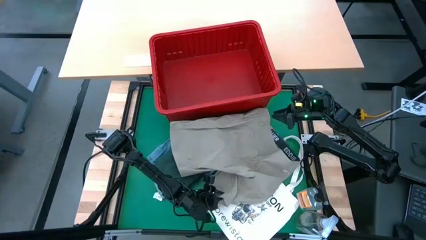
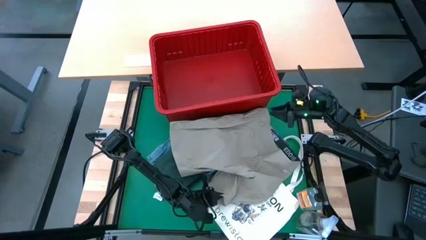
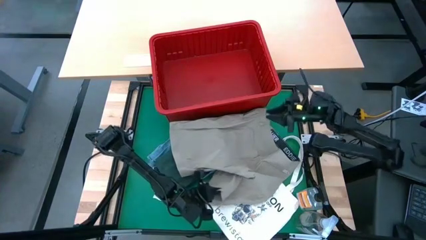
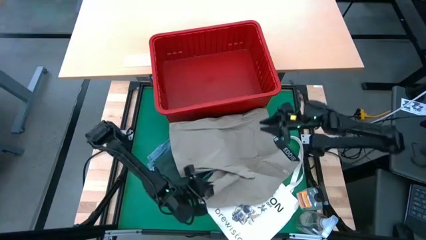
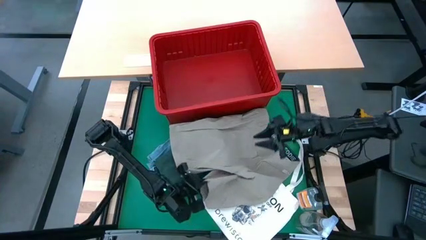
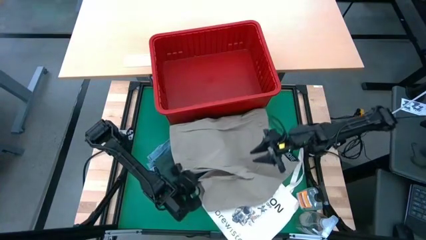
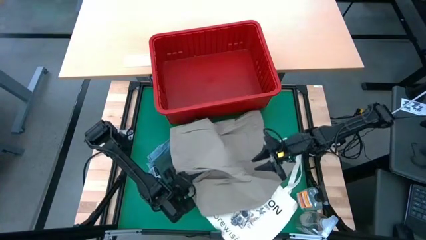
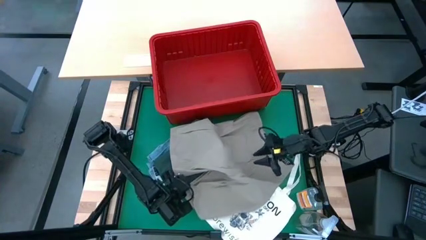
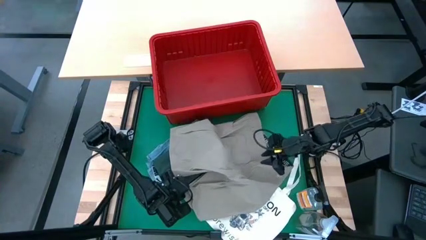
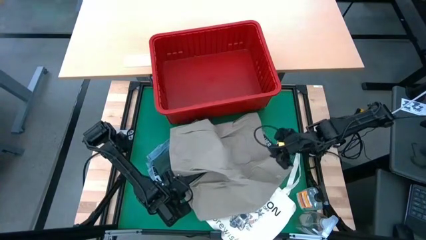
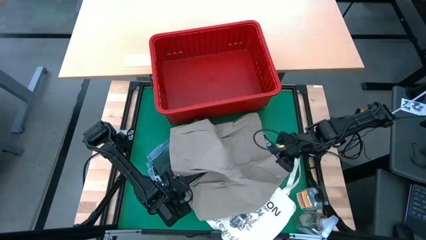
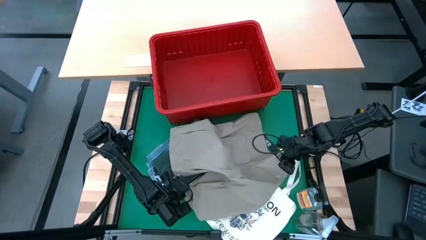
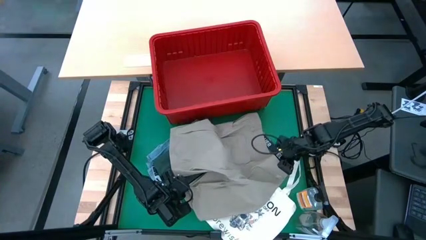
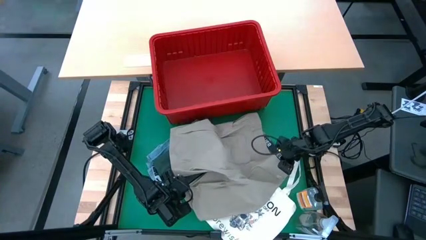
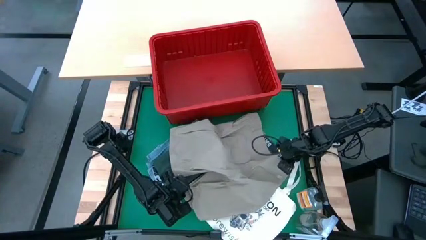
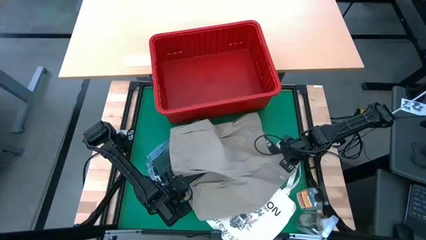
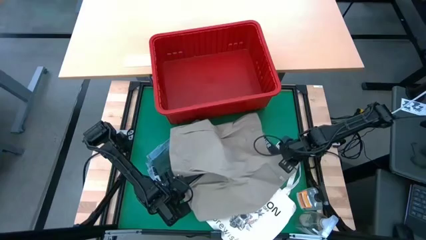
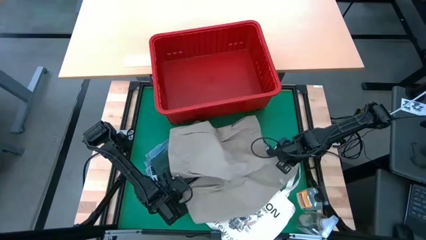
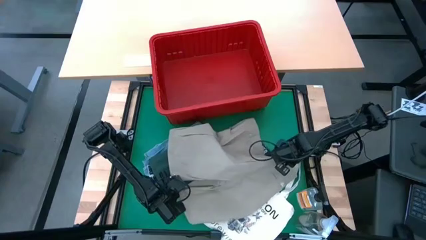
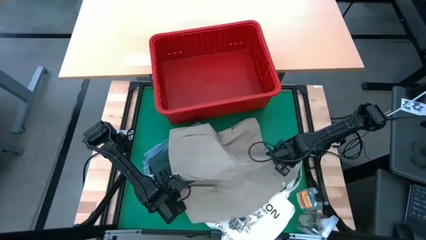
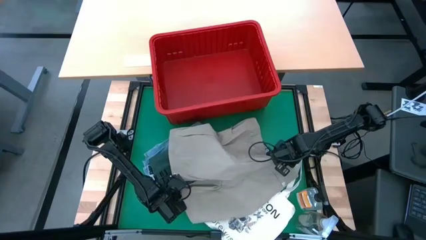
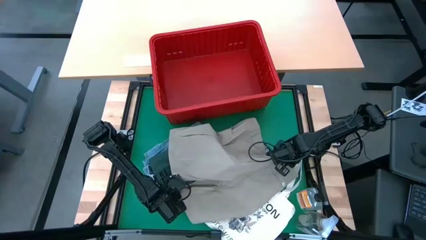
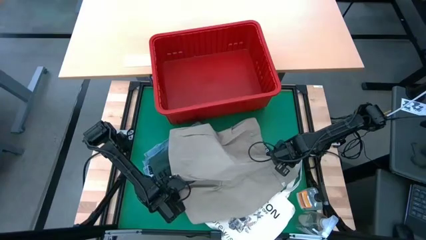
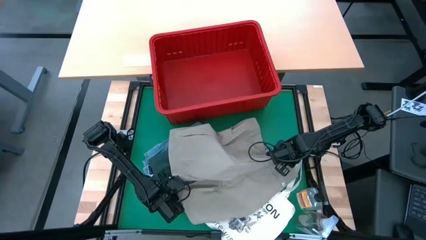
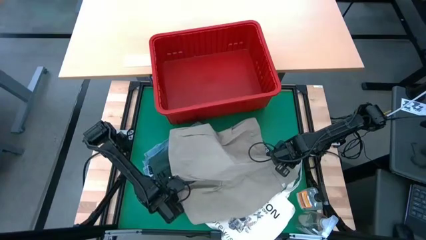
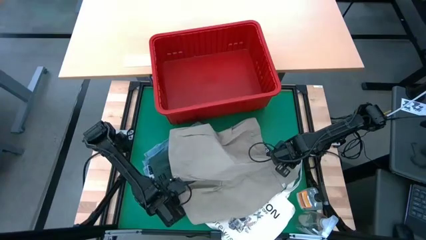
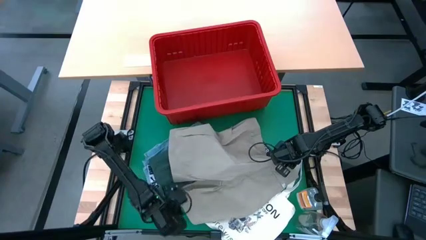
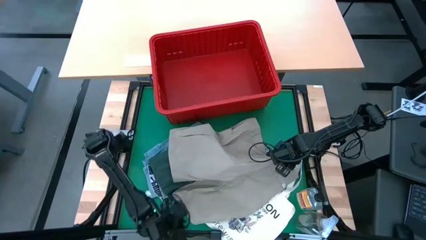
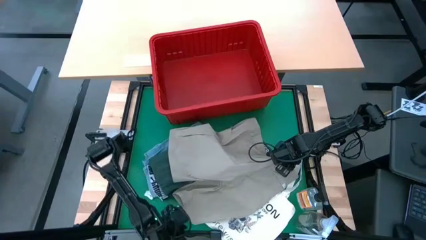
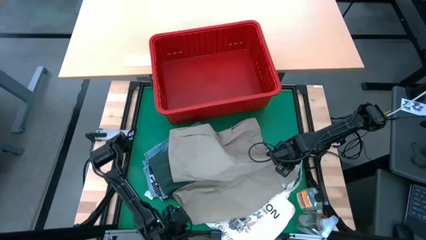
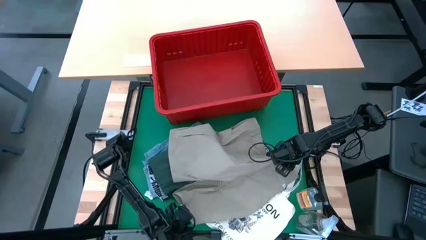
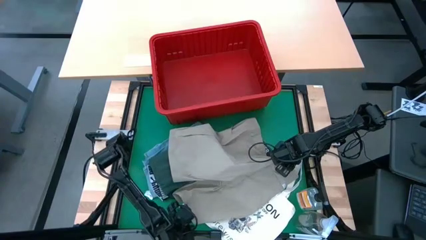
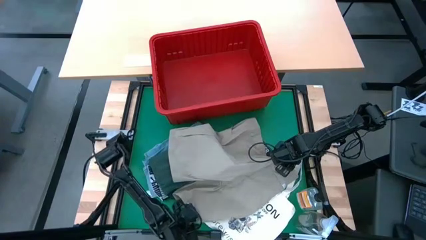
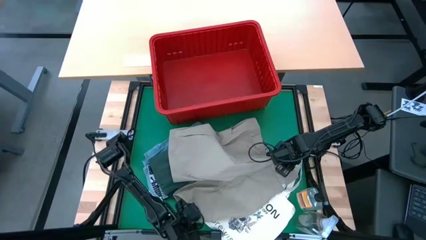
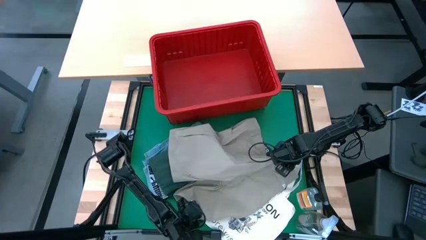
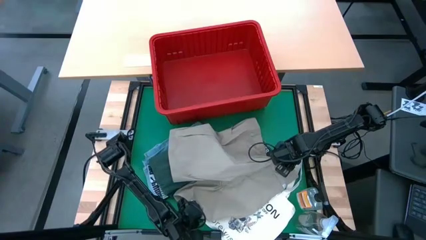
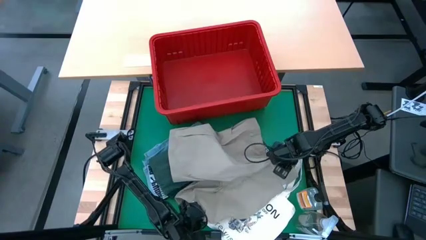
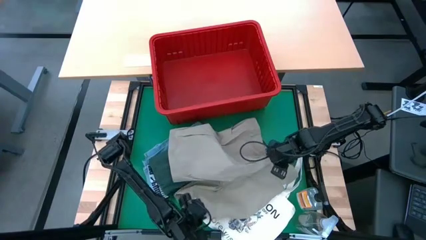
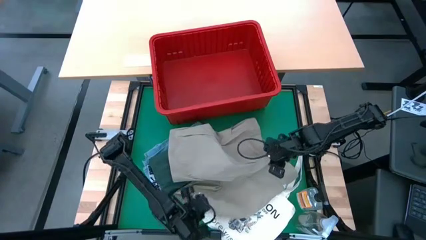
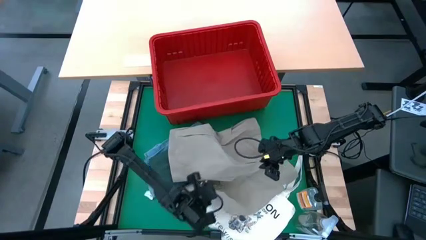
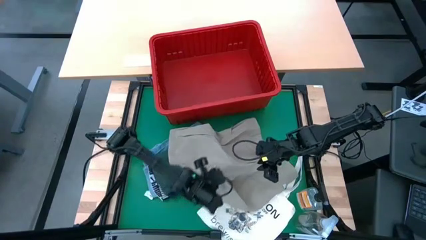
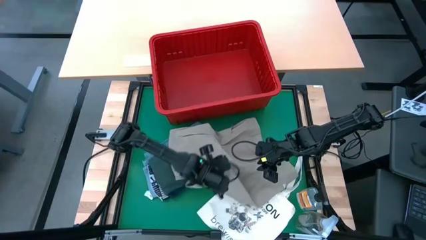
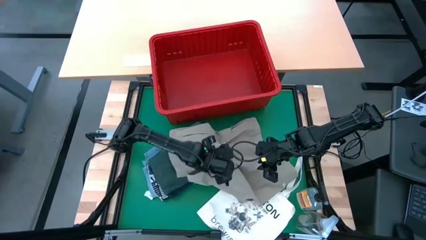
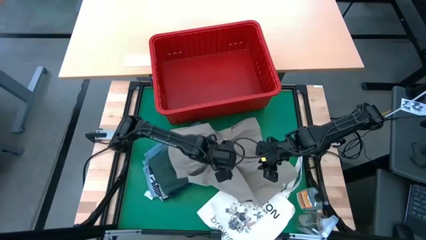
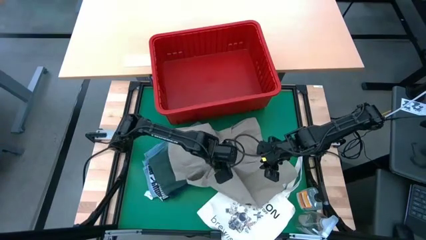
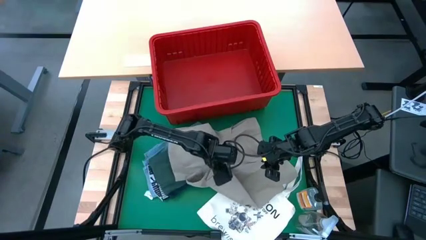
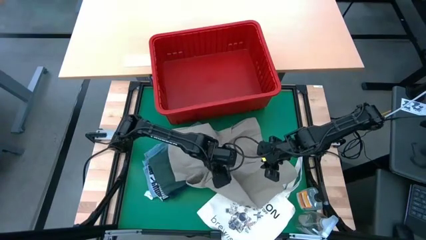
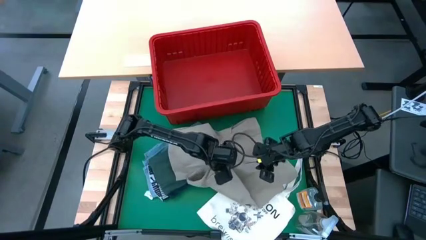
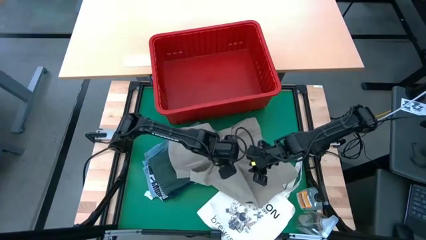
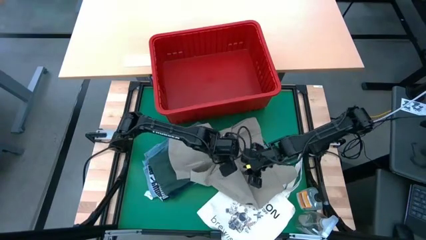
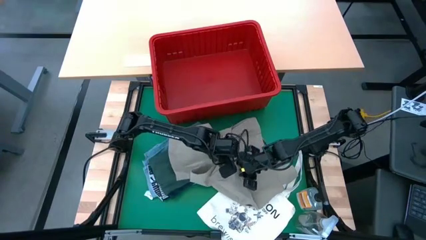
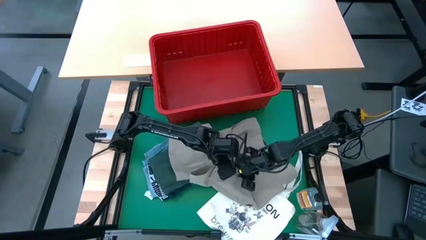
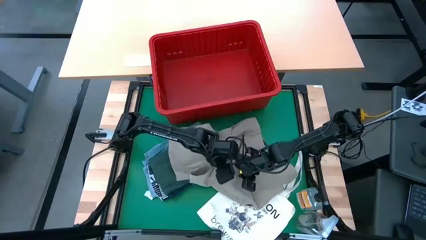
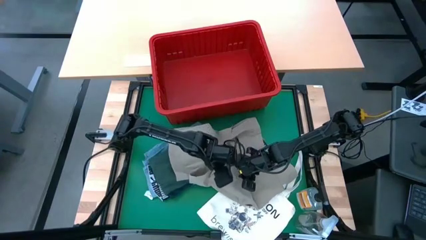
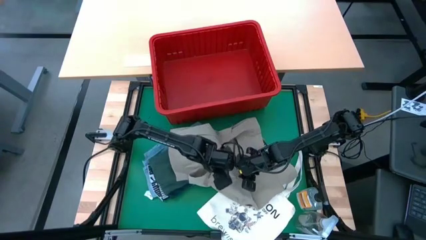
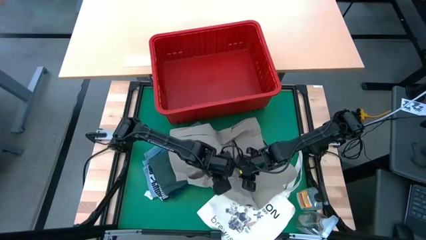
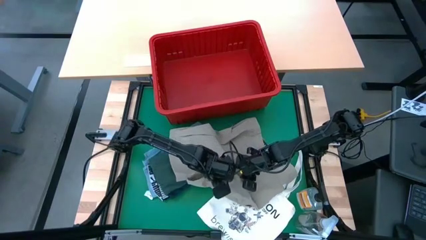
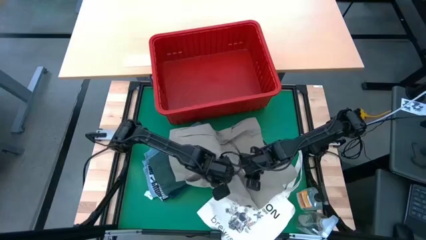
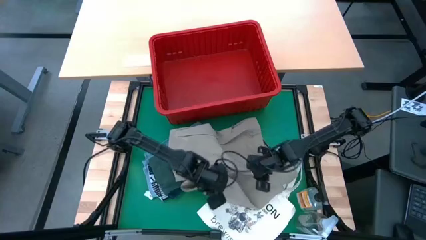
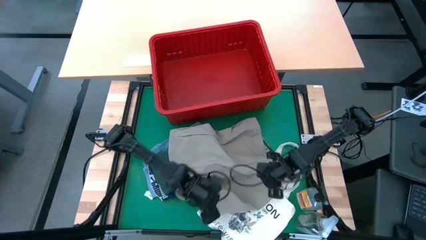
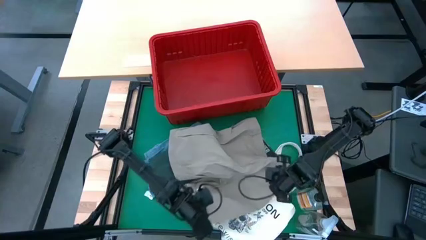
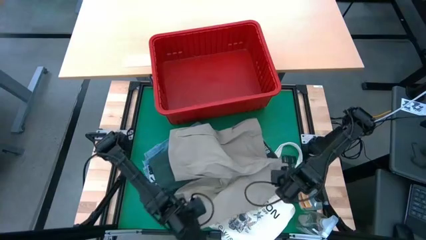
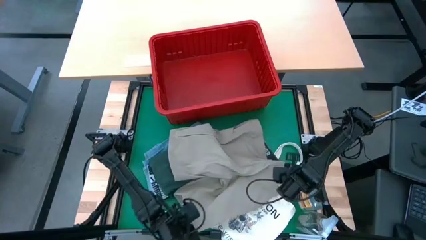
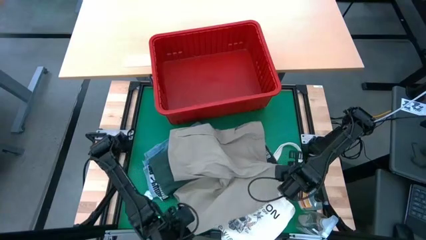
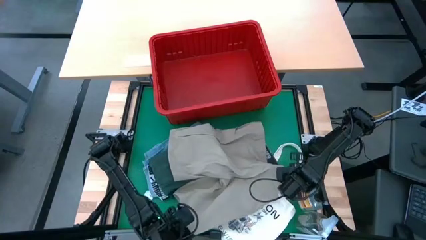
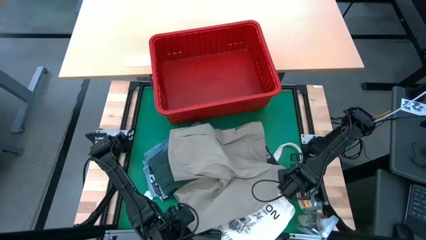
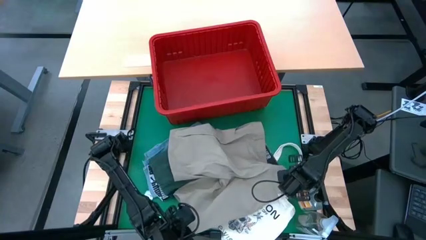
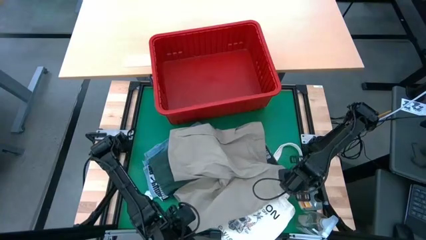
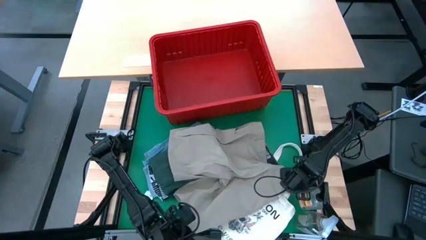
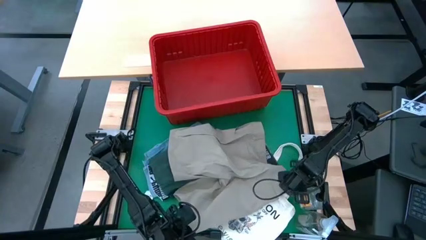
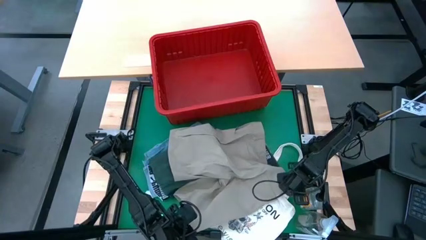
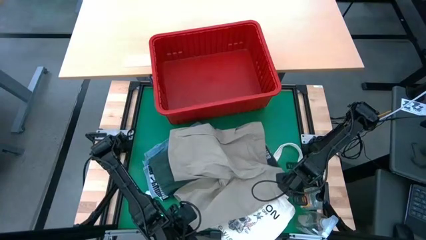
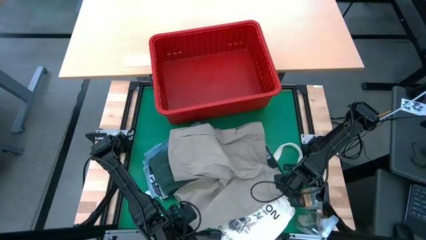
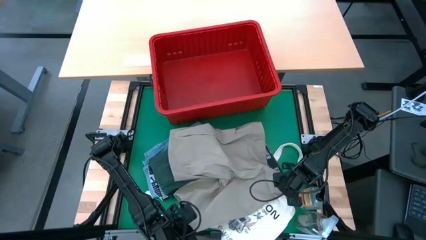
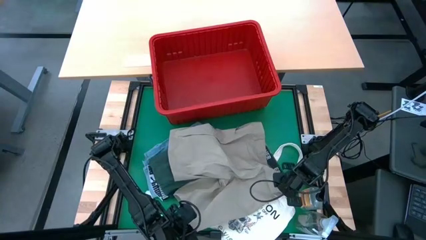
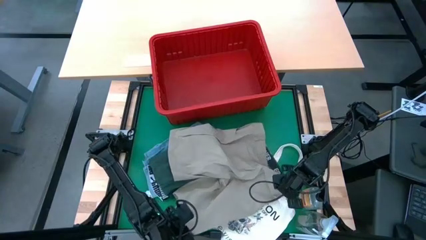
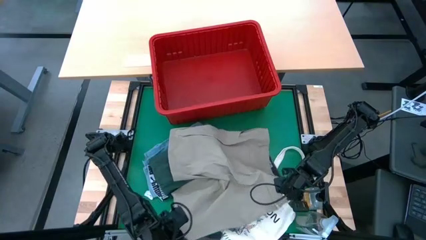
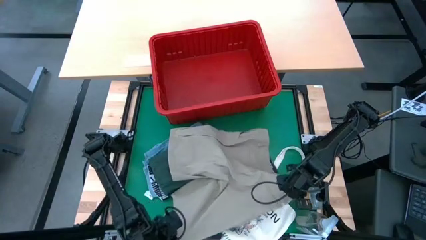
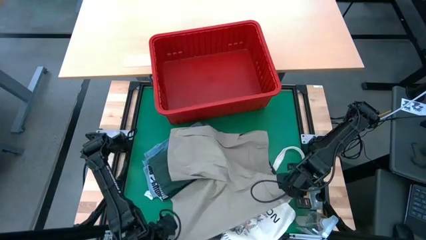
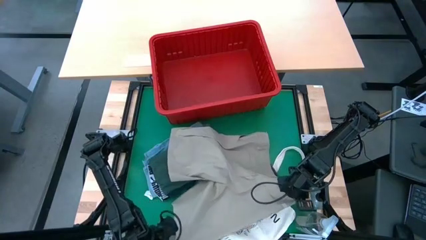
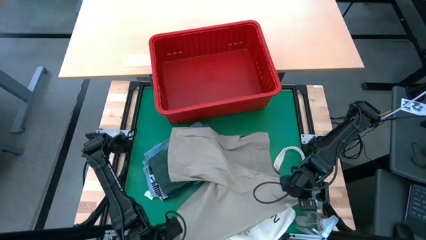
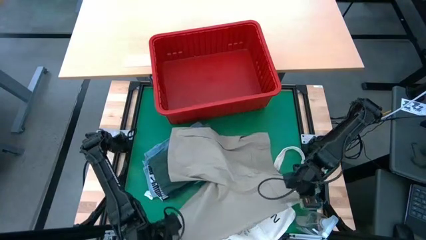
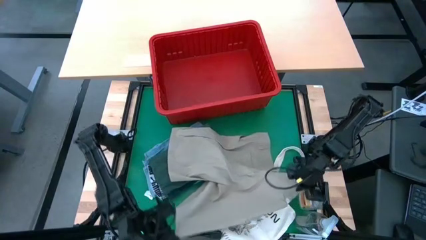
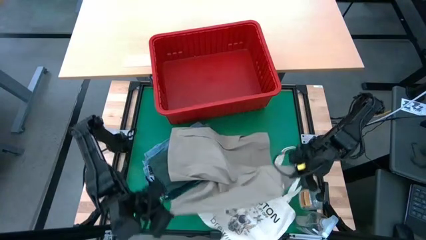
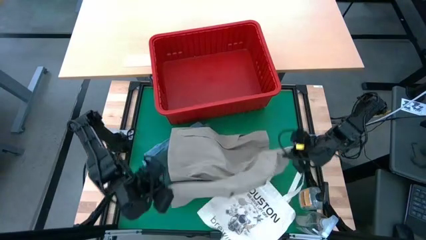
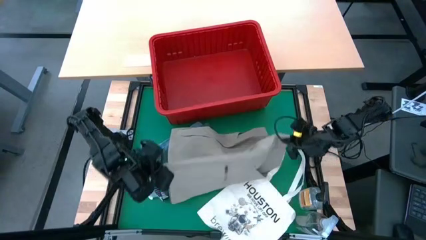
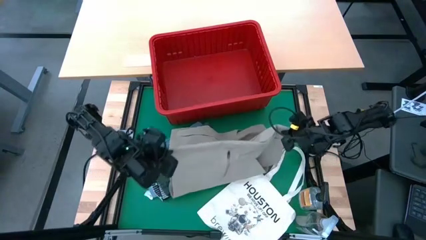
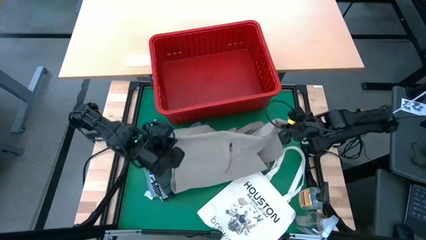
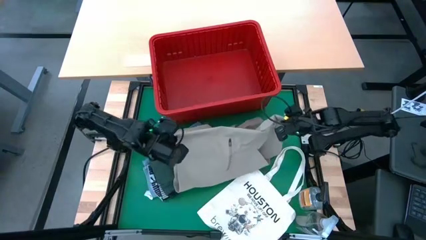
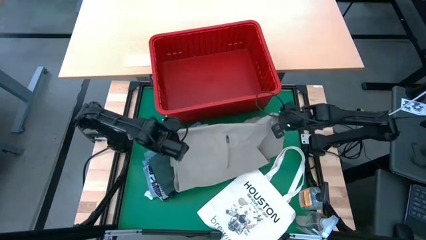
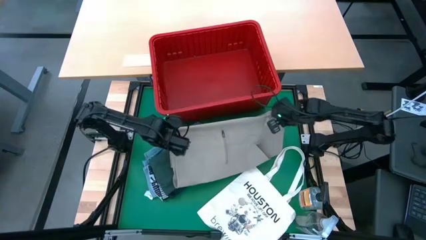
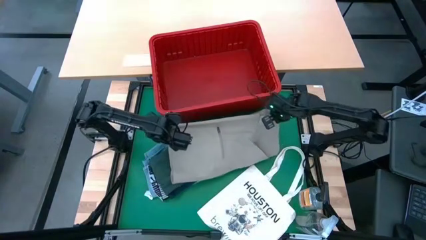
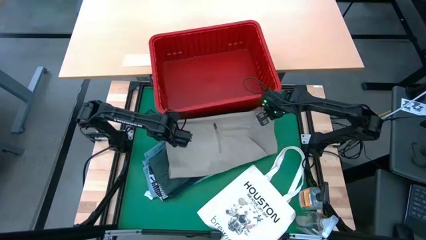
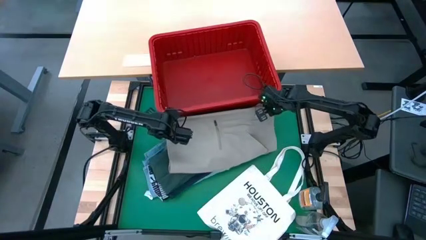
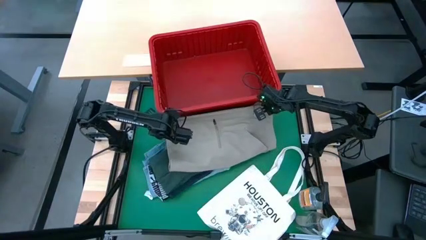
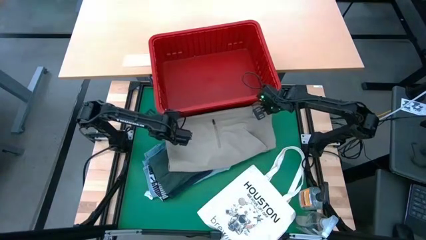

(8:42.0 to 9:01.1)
Task: Fold Laundry from Bin
Fold the light brown shorts
